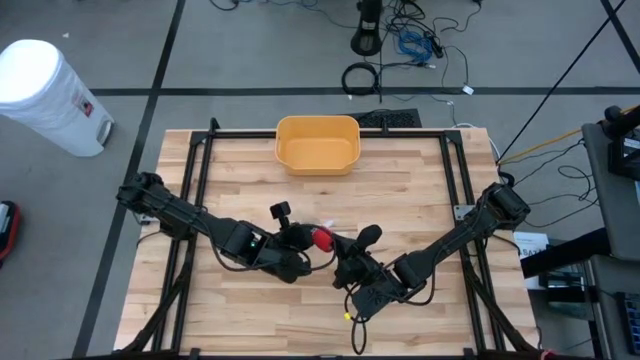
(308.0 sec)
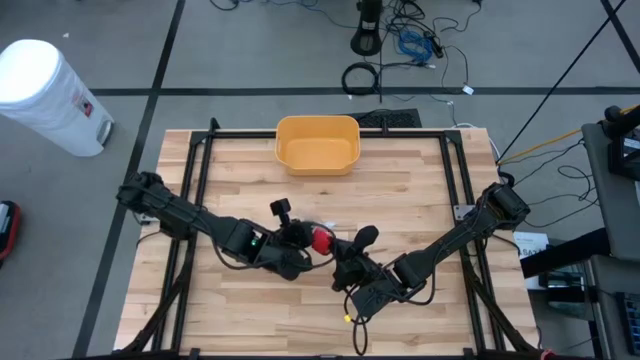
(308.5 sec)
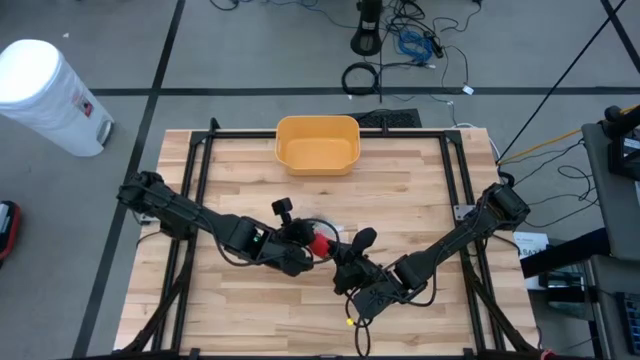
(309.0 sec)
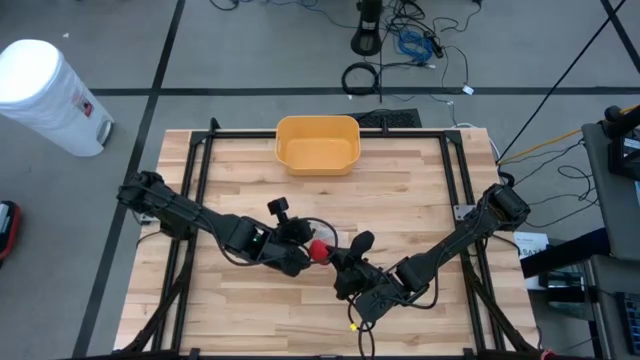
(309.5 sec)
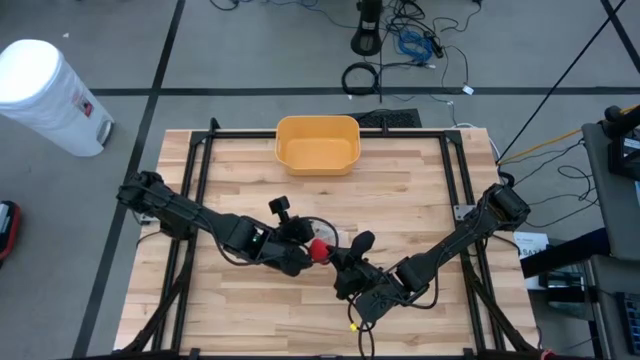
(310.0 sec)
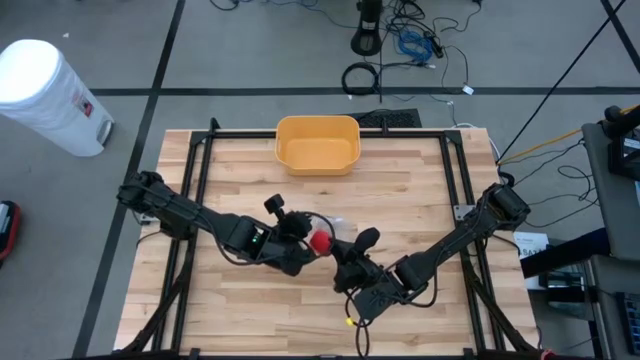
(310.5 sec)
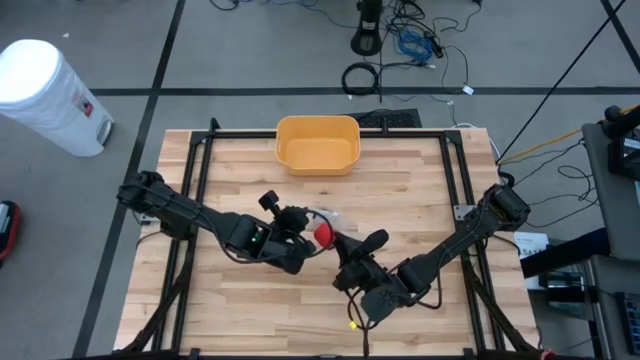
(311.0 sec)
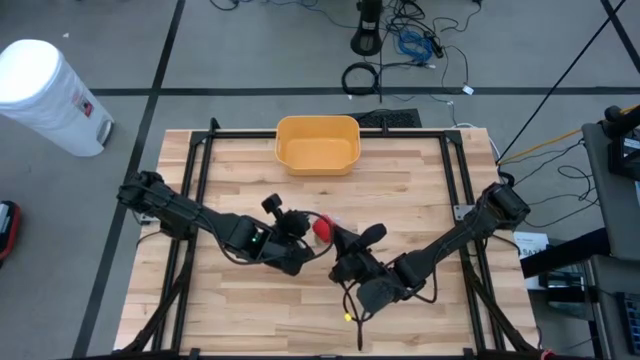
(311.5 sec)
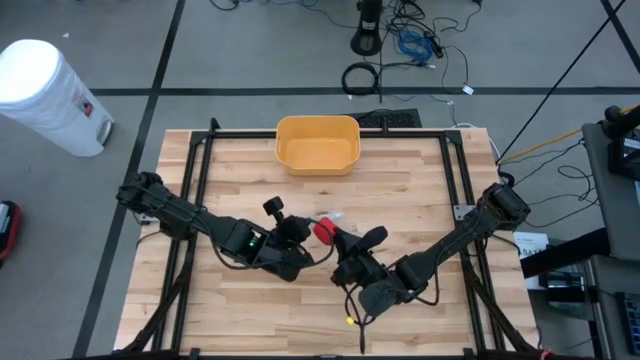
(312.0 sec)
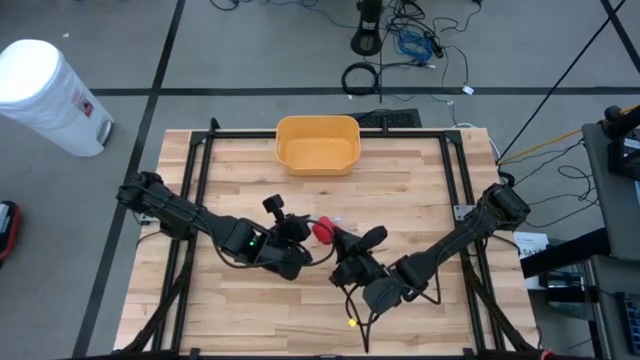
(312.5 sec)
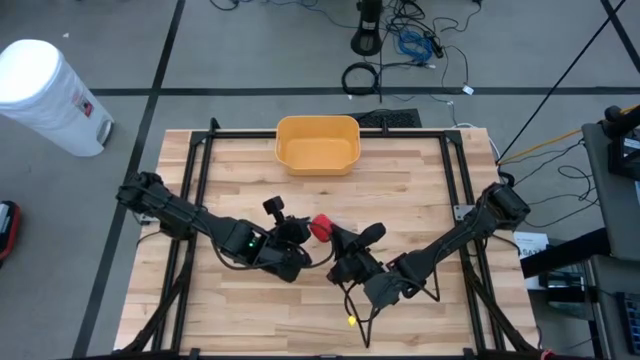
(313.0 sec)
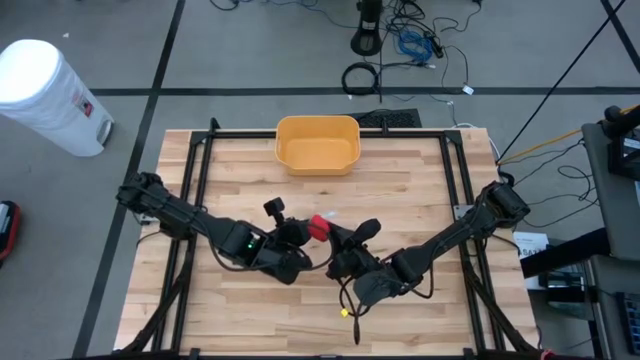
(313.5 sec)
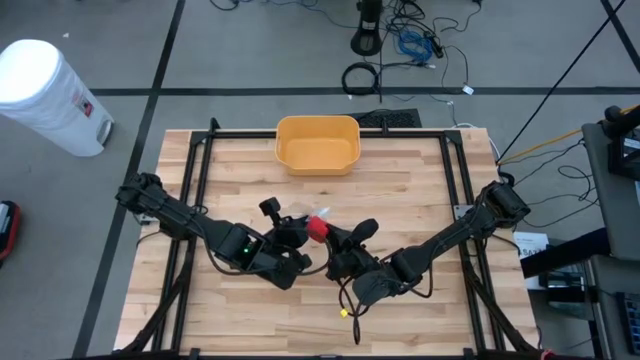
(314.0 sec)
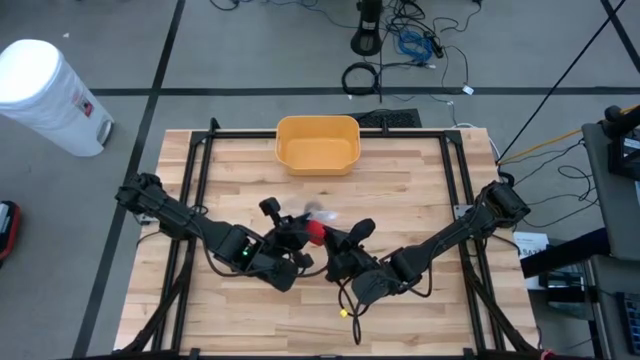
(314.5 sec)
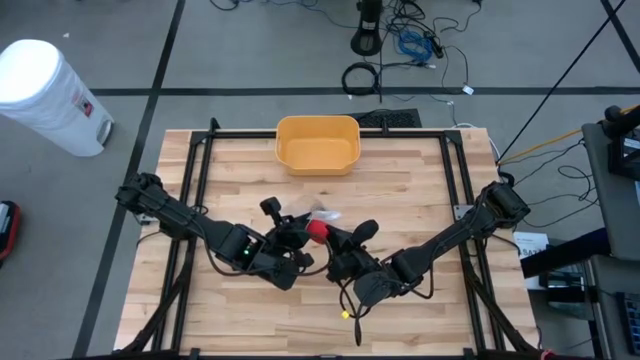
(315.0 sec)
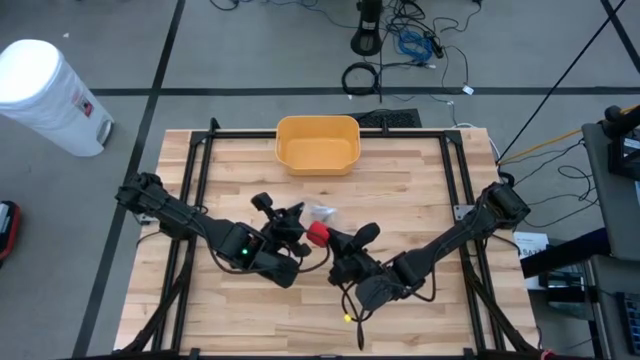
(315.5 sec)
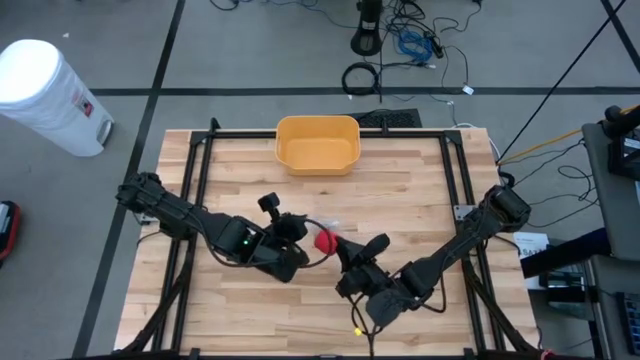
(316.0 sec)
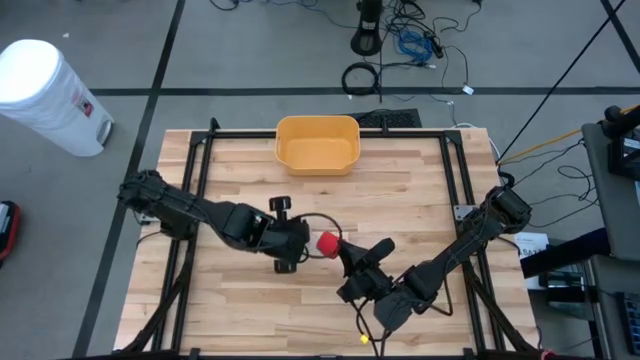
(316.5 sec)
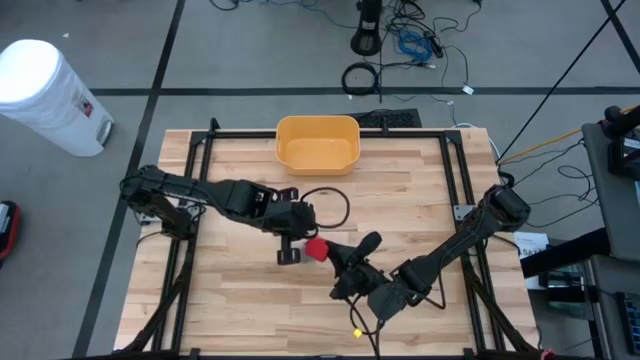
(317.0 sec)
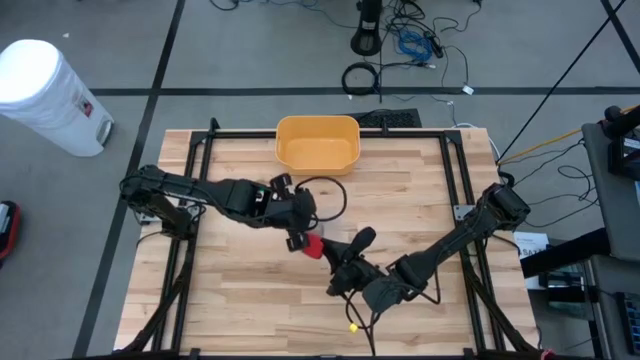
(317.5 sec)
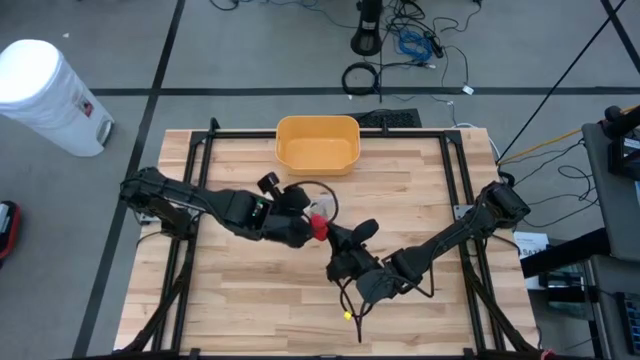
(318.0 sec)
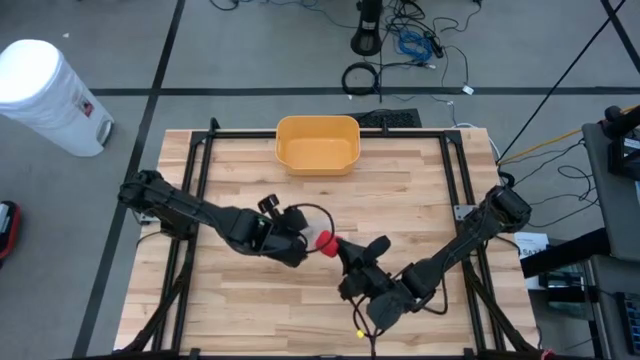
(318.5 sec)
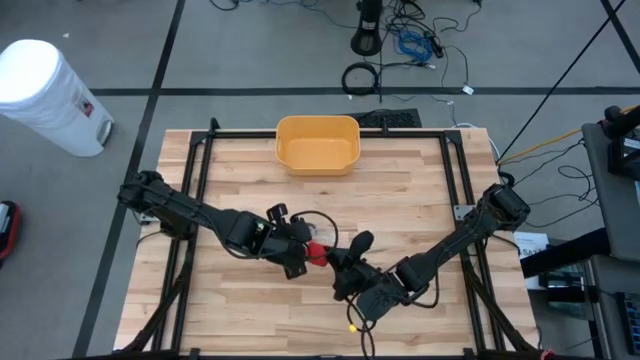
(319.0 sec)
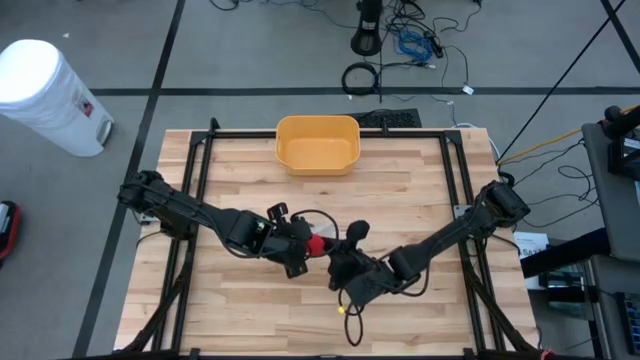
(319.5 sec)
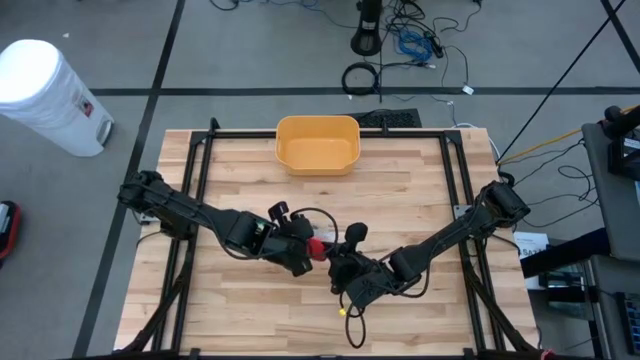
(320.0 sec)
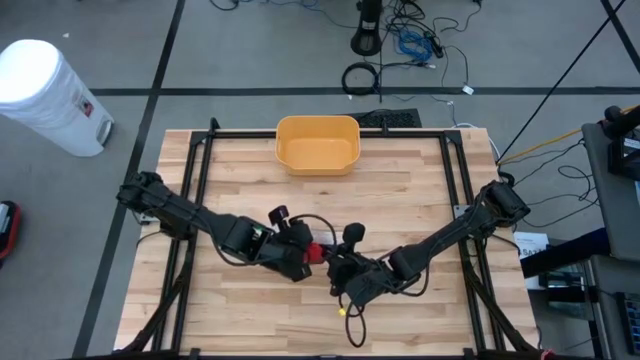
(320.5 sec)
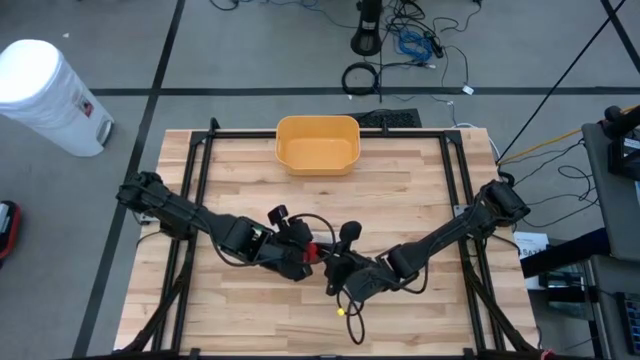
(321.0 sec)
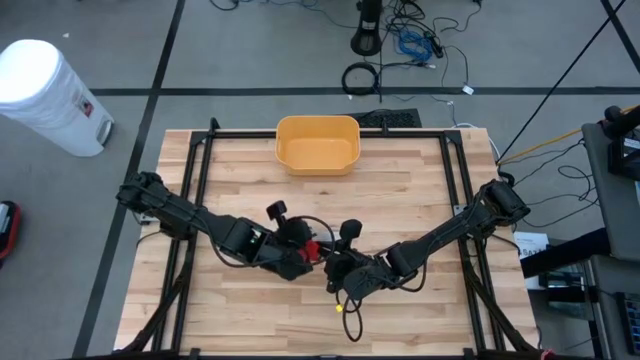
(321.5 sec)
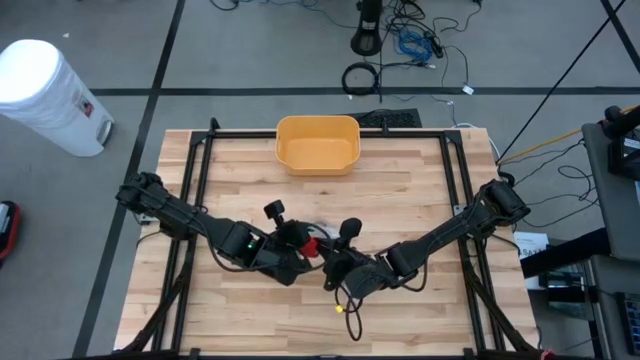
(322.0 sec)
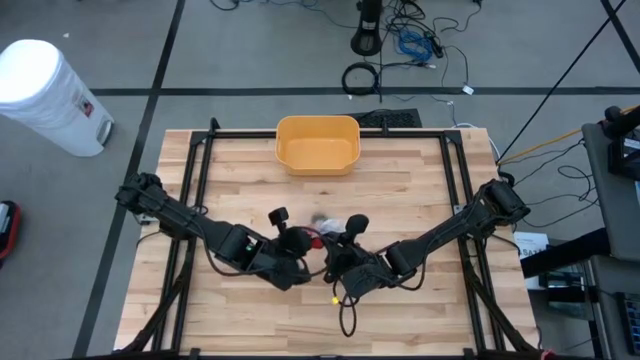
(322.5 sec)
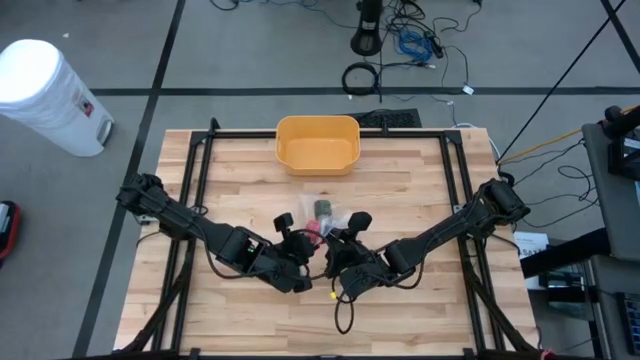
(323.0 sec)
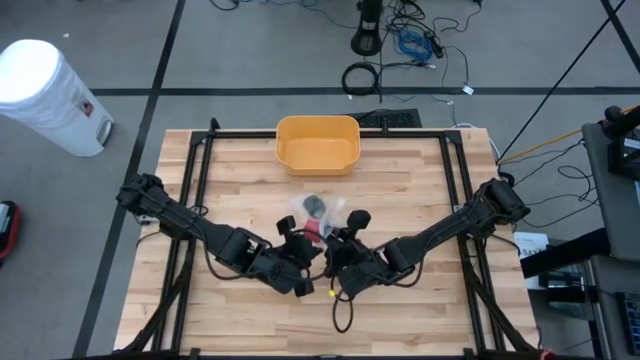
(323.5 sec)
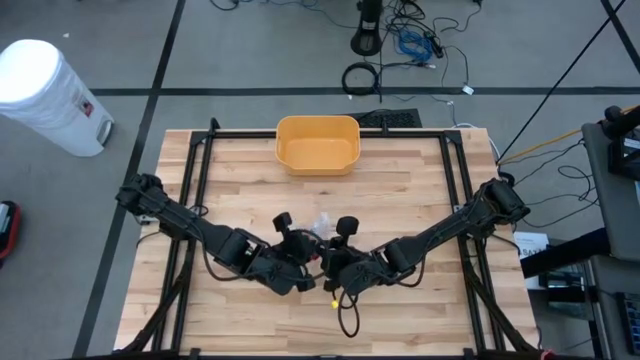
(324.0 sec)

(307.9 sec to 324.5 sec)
Task: Roll bandage
Put the red bandage into the transparent zip bag

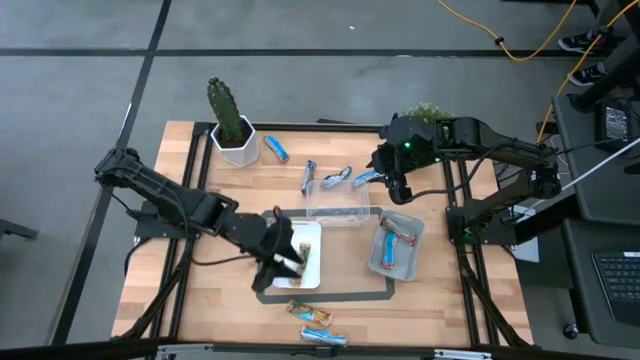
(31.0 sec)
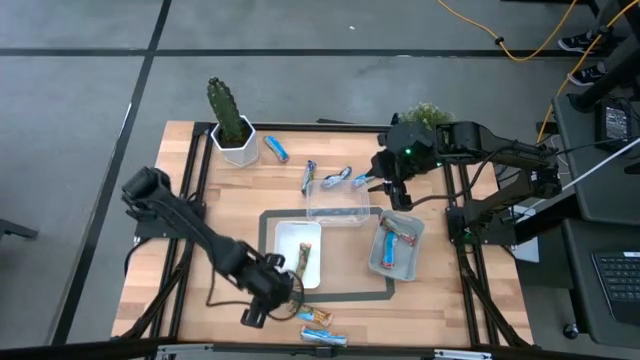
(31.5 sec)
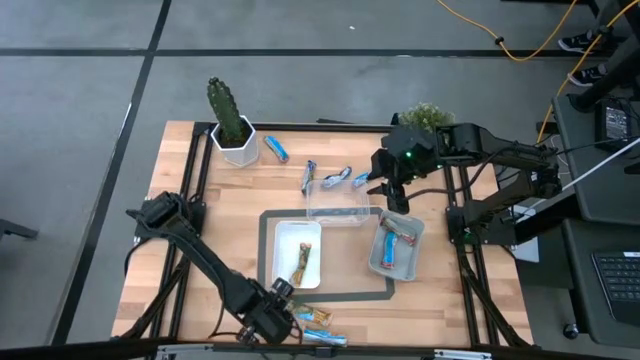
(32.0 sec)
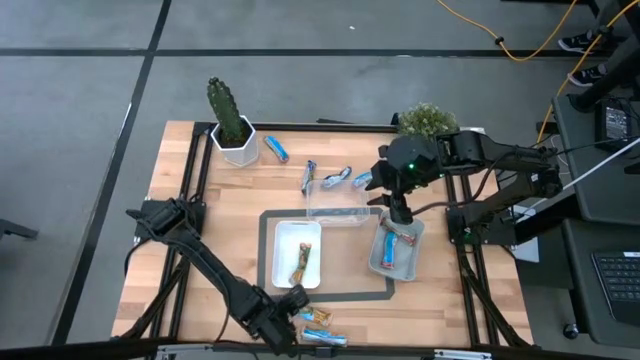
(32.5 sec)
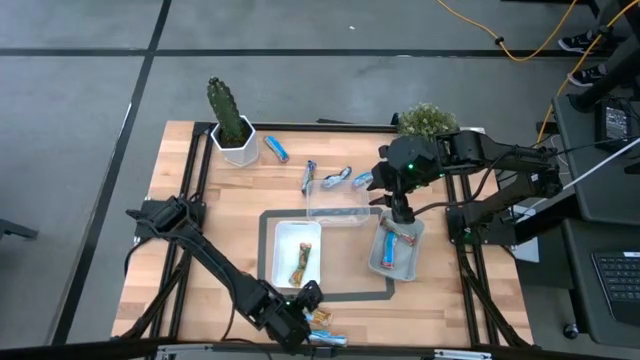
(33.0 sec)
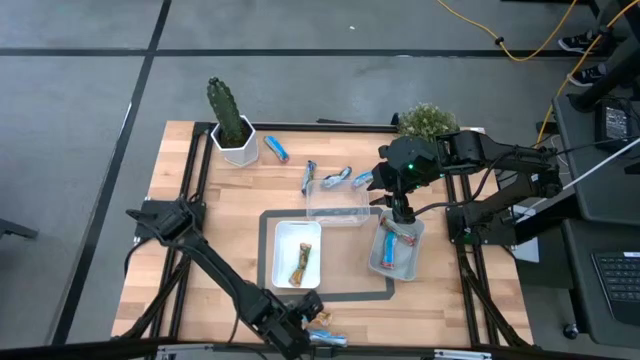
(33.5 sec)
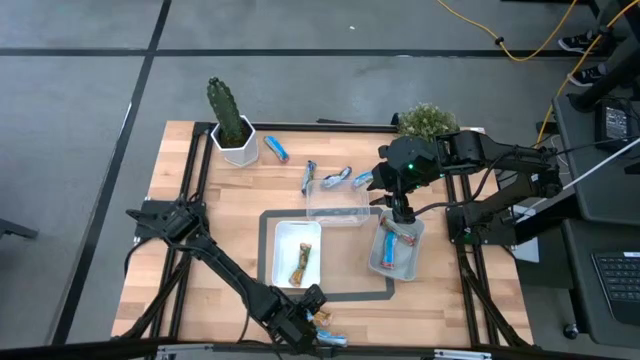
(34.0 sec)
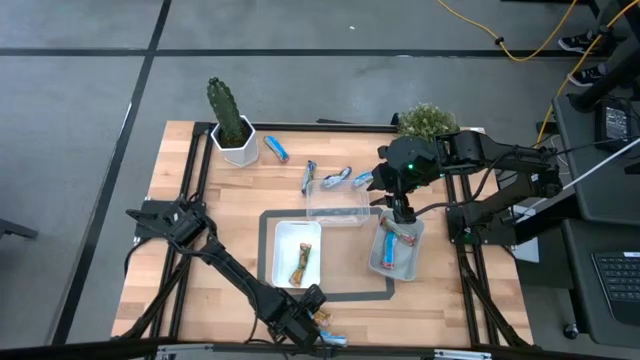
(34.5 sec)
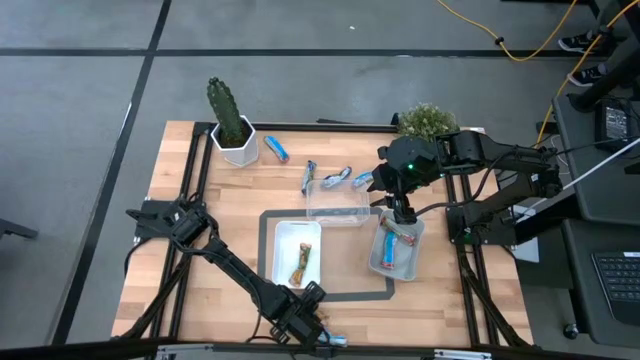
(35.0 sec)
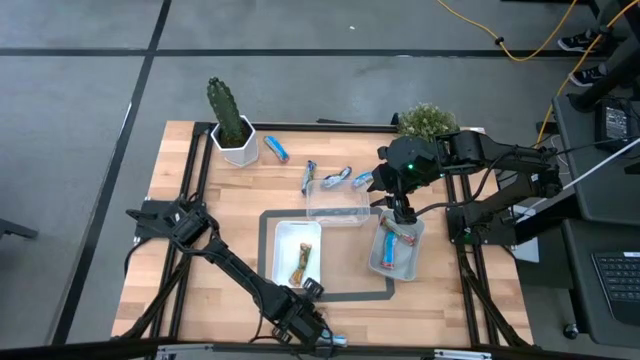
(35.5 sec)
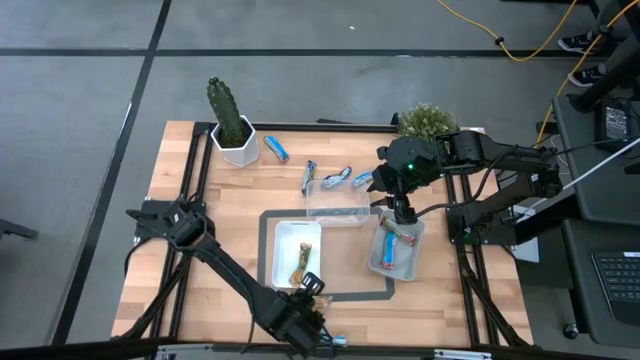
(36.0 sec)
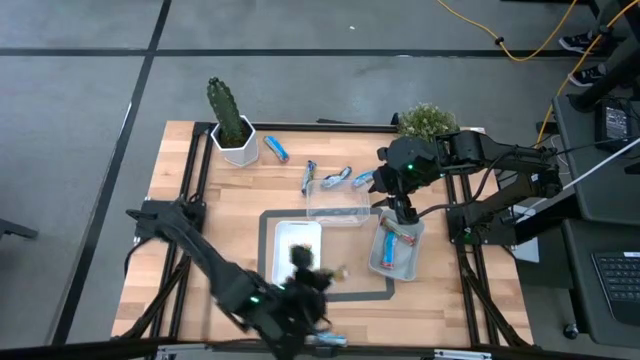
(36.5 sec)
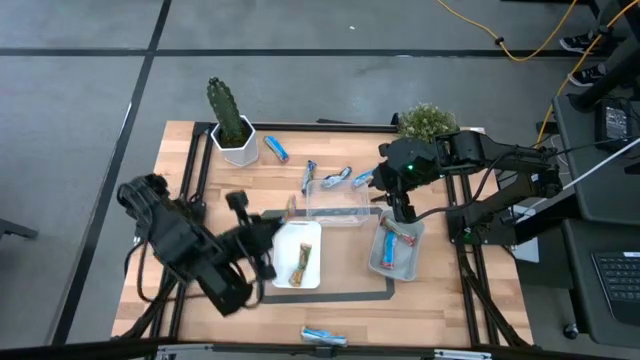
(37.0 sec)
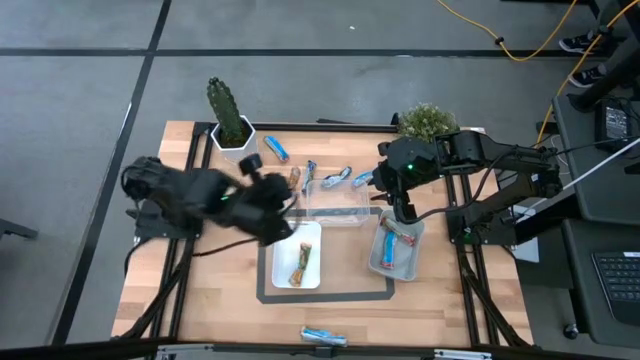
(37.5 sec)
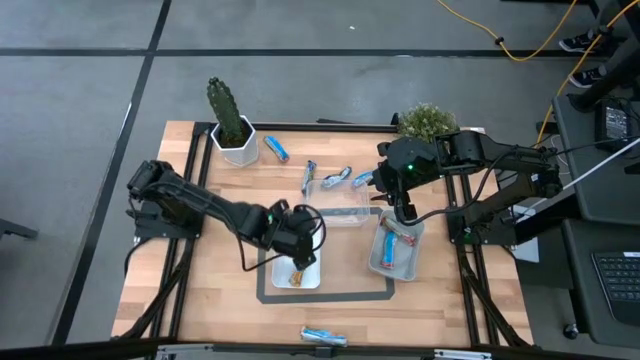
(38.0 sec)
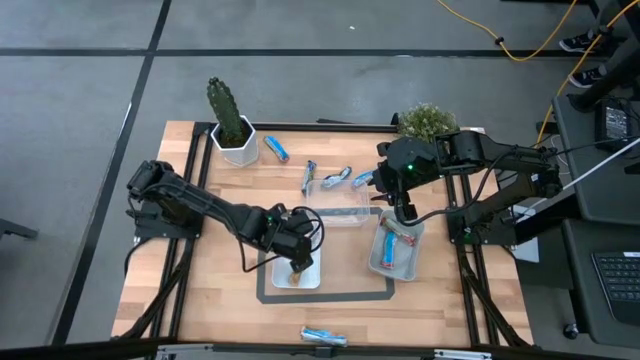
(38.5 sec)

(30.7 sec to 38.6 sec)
Task: Pick and place Granola Bars by type
Put the top orange granola bar into the white bin
